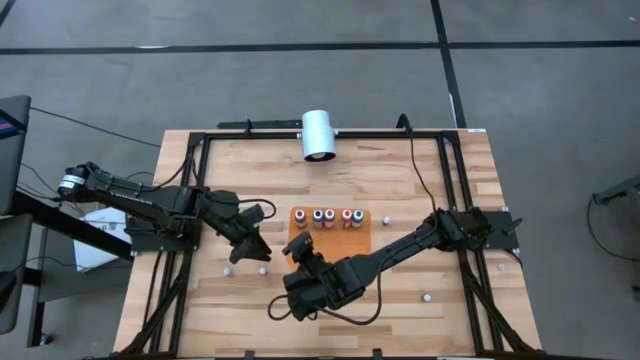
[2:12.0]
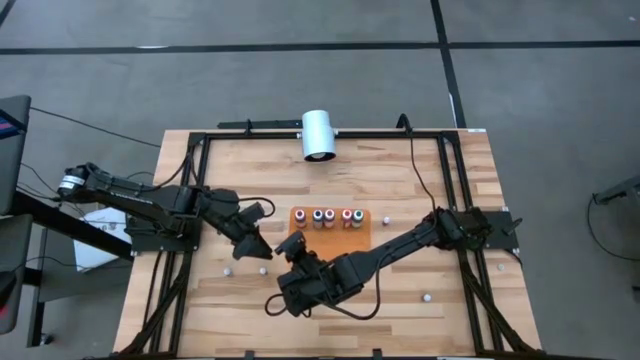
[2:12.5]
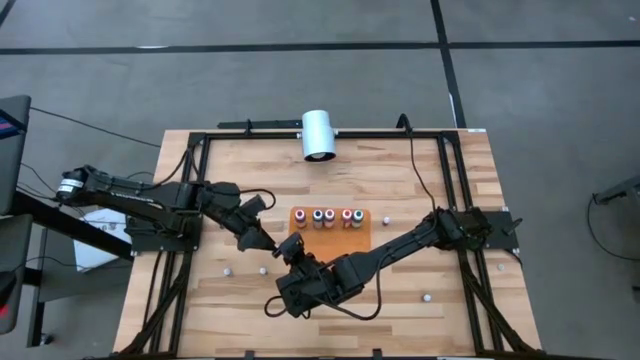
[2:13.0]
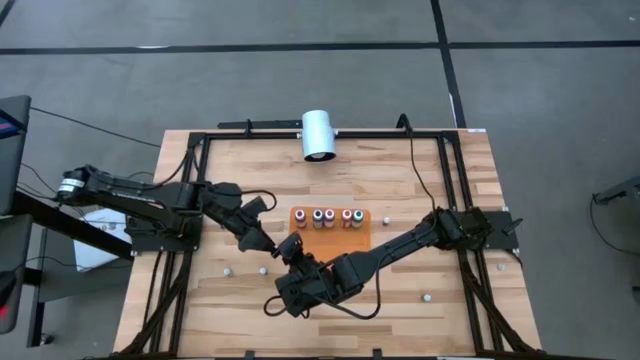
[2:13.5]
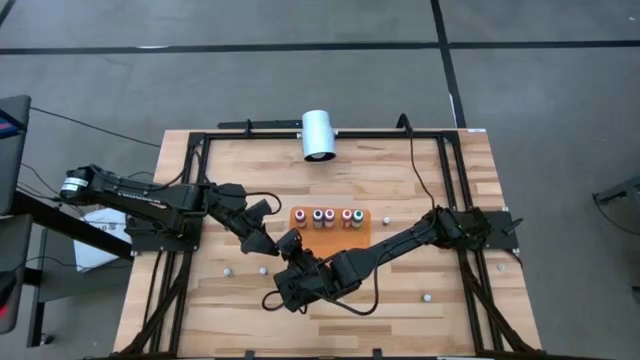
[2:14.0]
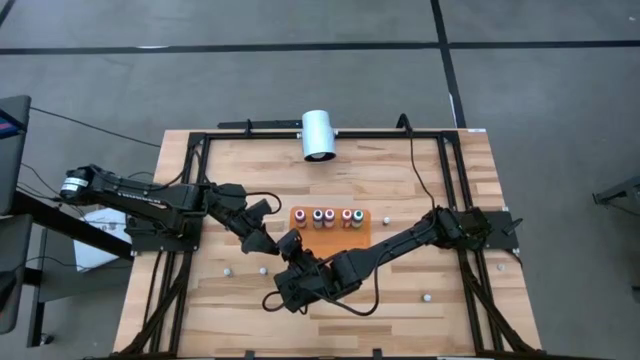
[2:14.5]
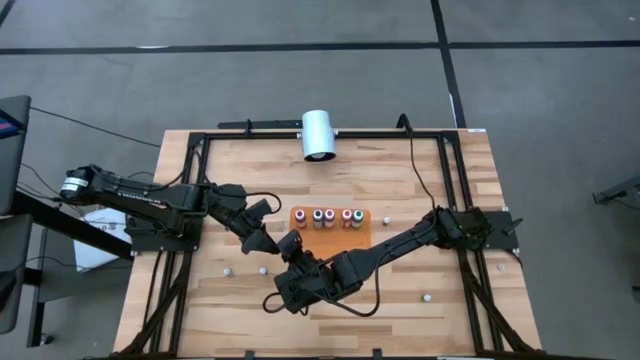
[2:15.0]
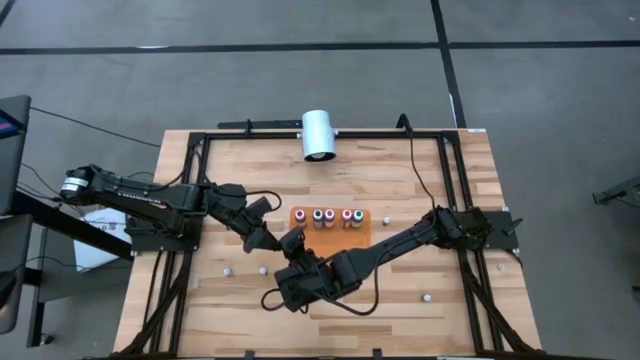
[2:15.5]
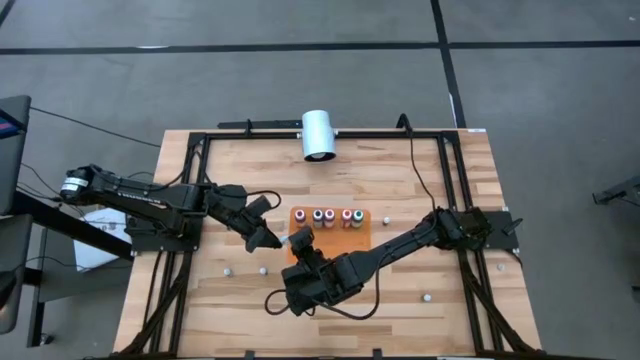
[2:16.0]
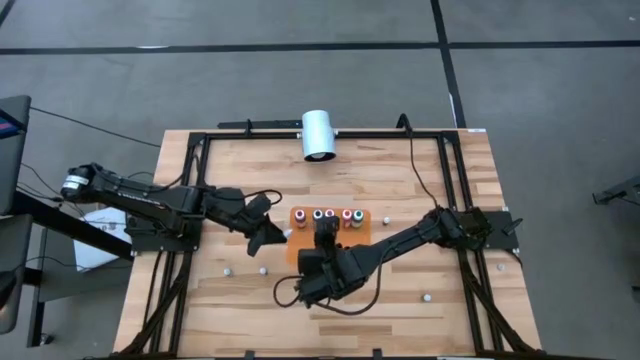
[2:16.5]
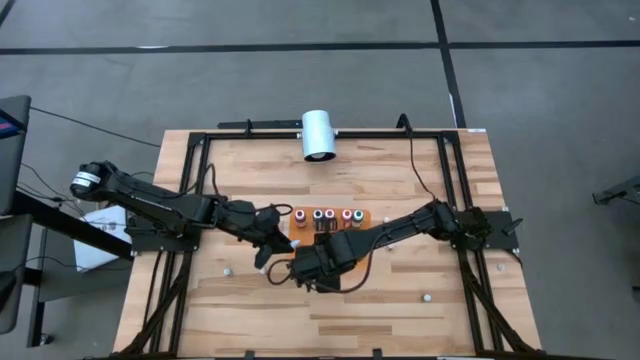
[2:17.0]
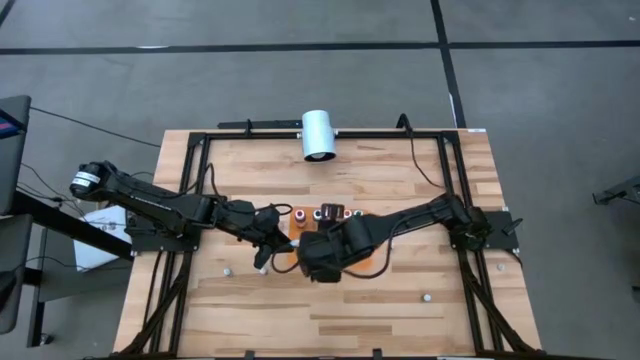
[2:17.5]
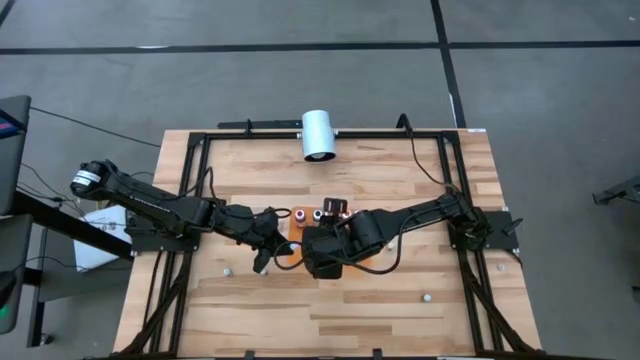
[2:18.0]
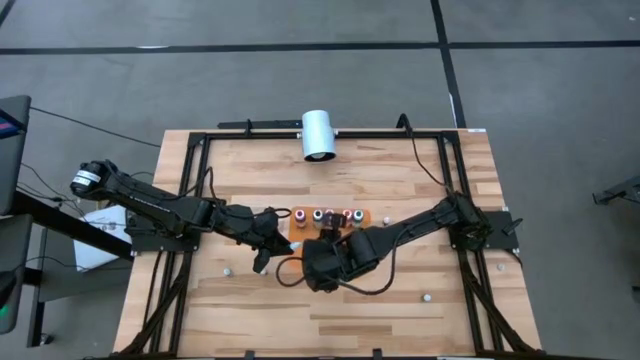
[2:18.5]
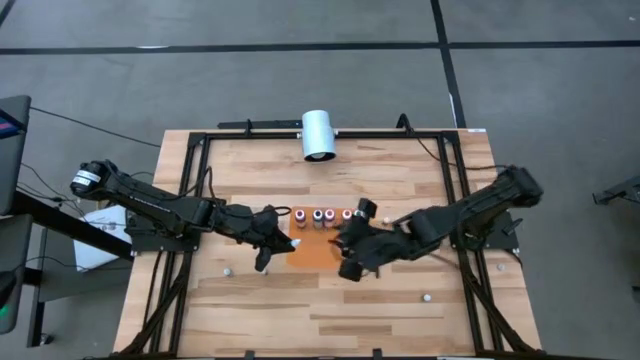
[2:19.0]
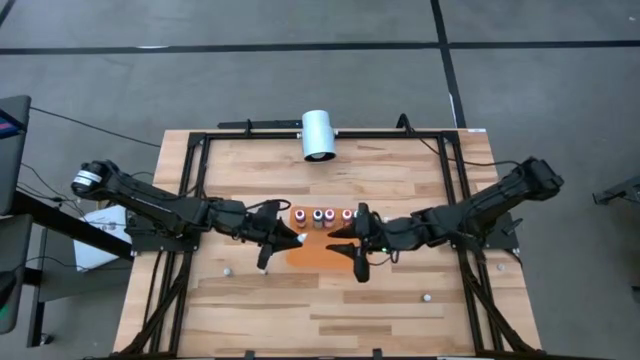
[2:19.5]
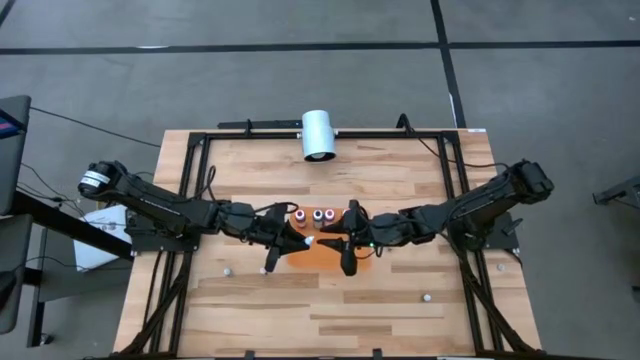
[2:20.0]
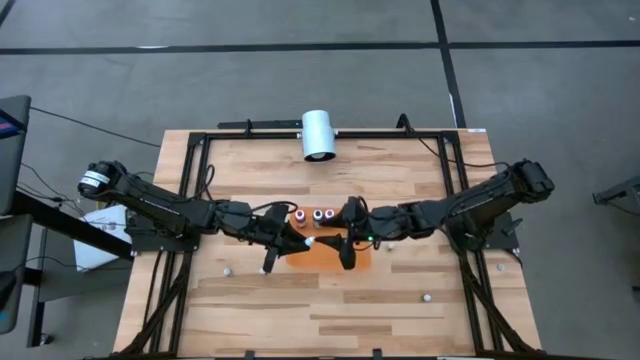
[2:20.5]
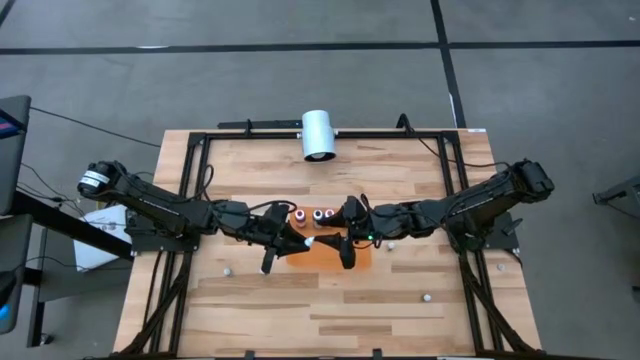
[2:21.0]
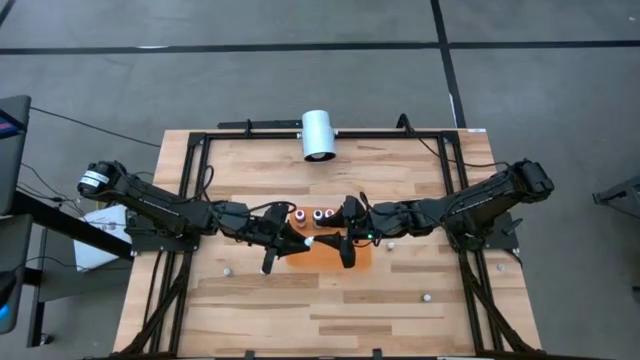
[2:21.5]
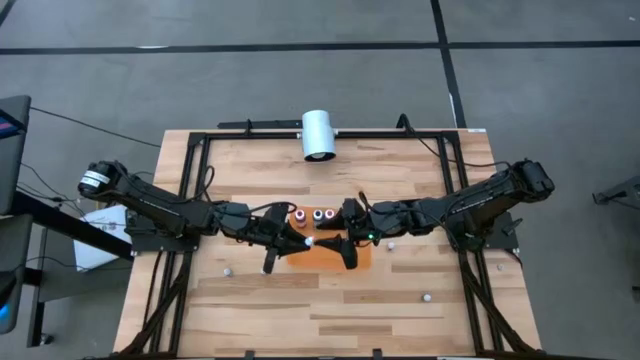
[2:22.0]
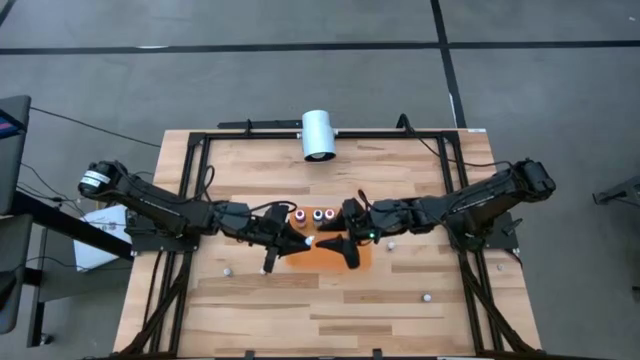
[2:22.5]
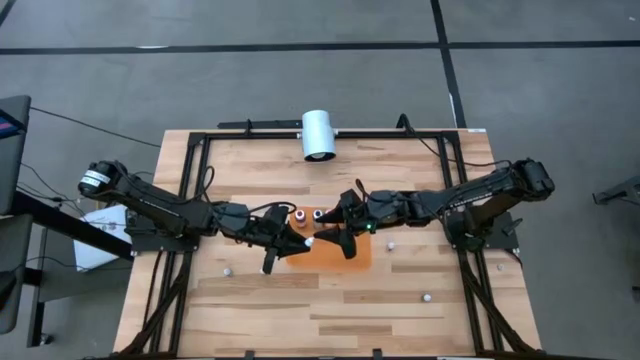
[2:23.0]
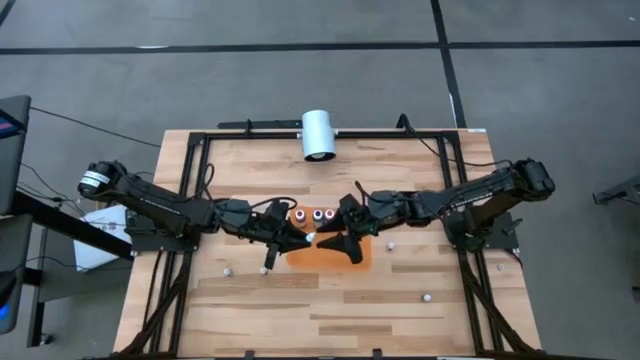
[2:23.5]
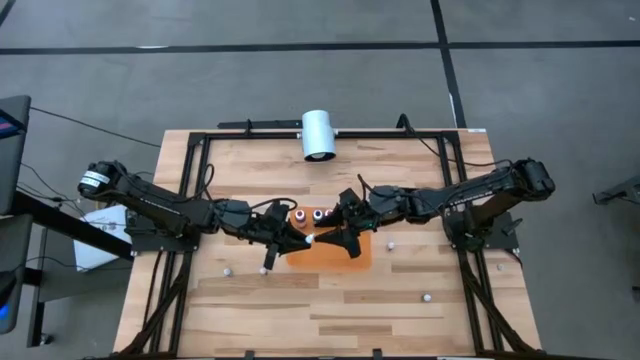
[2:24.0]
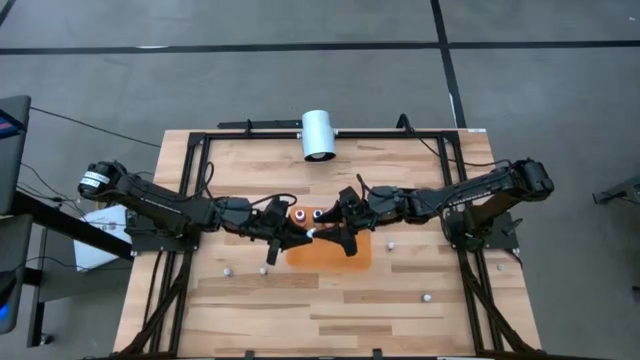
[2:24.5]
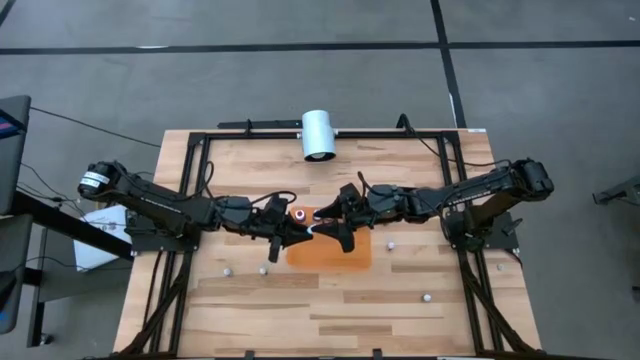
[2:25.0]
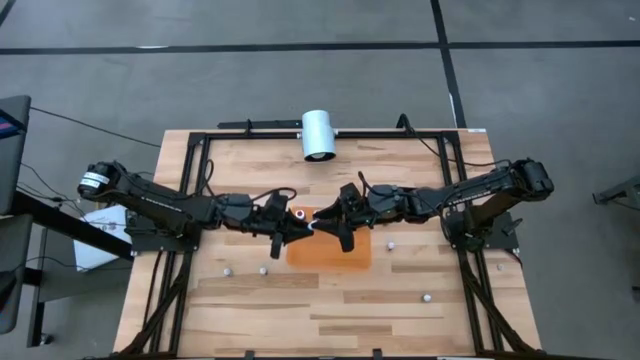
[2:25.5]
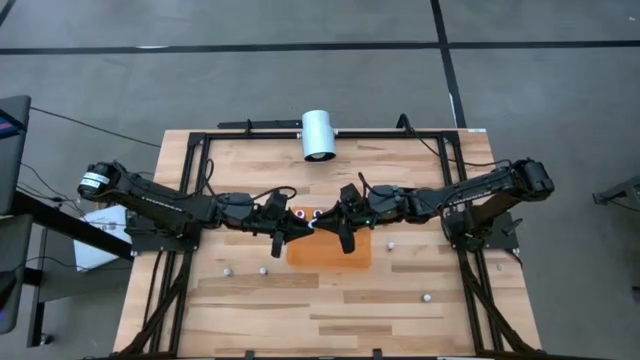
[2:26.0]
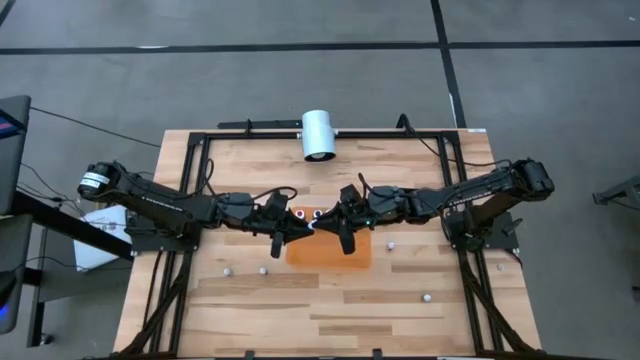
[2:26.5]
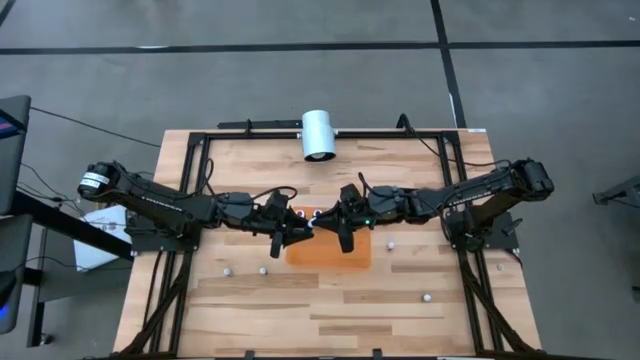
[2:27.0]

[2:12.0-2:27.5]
Task: Pick & Place food coloring
Put the small black food coloring into the orange bin

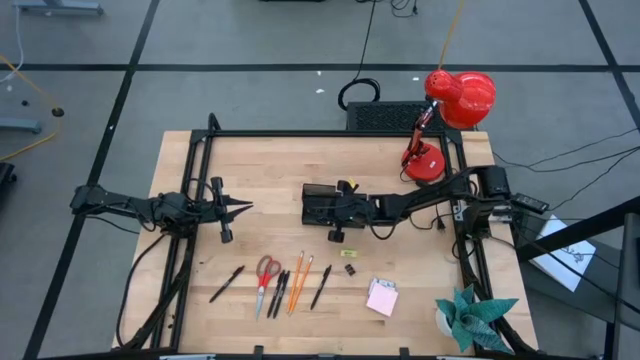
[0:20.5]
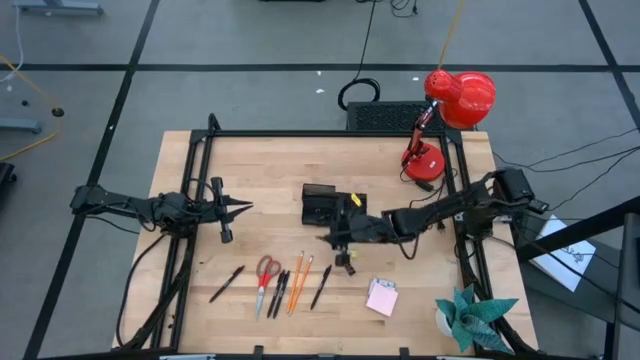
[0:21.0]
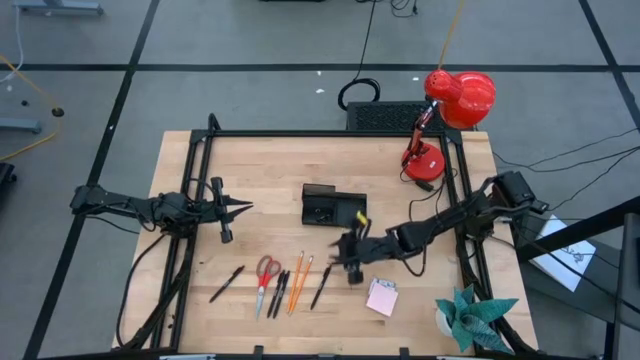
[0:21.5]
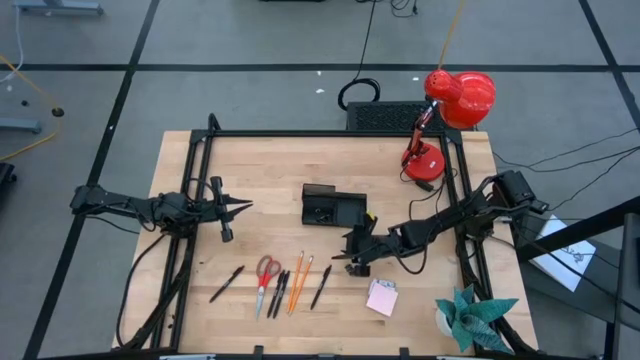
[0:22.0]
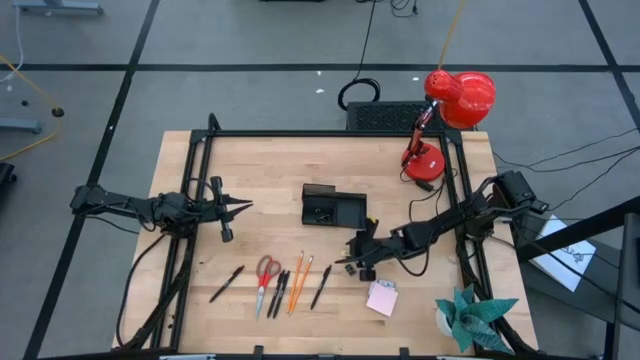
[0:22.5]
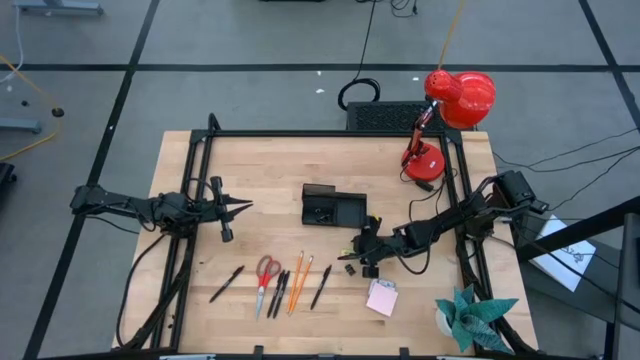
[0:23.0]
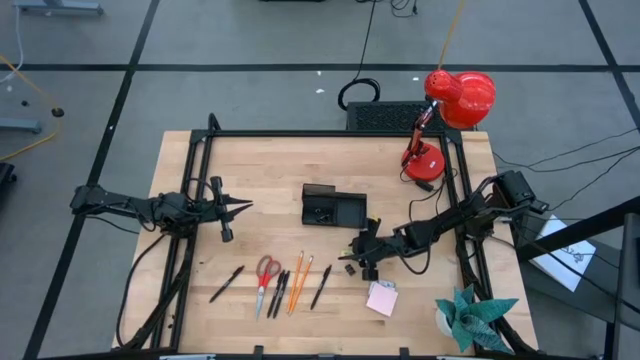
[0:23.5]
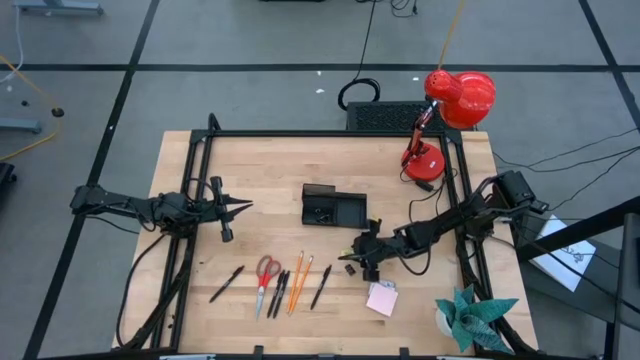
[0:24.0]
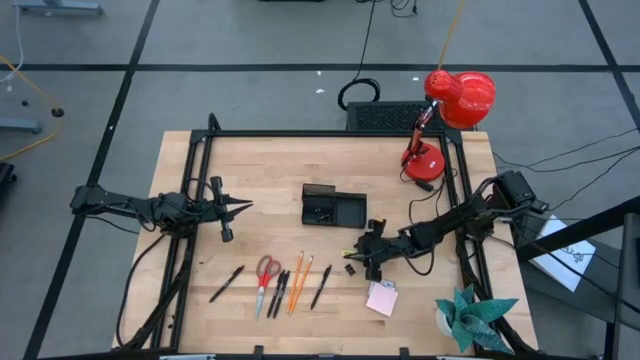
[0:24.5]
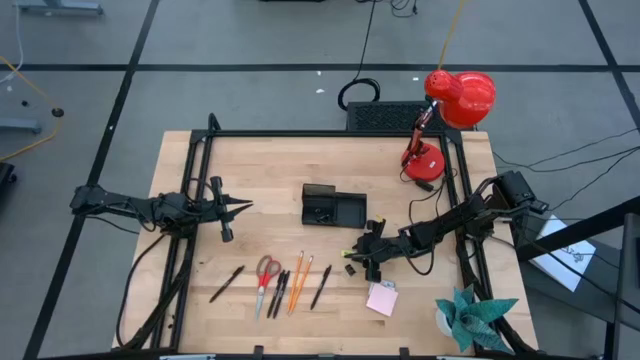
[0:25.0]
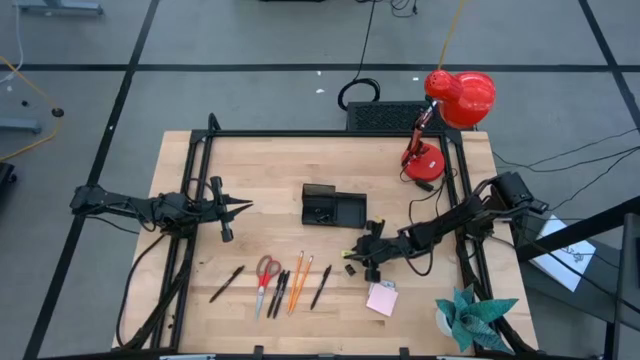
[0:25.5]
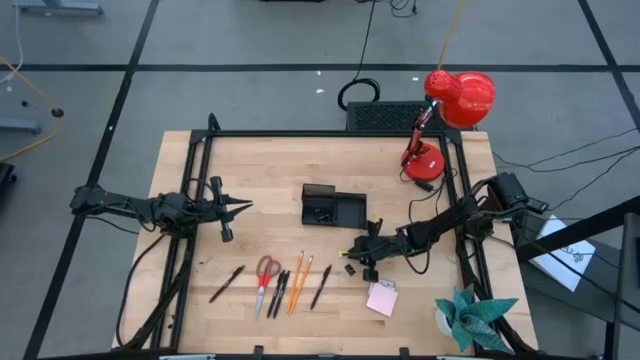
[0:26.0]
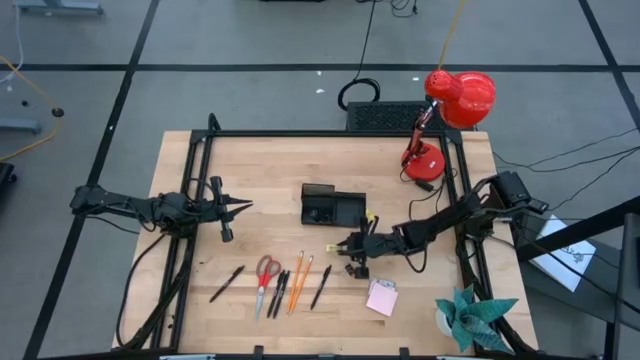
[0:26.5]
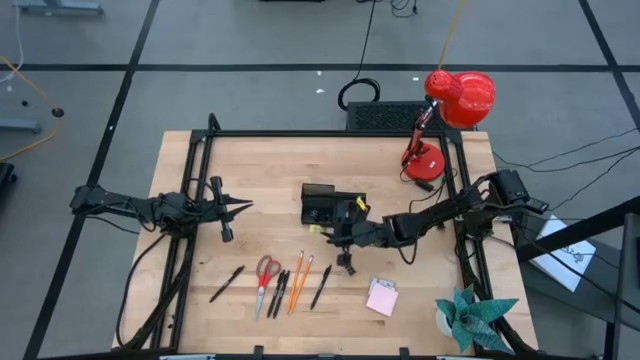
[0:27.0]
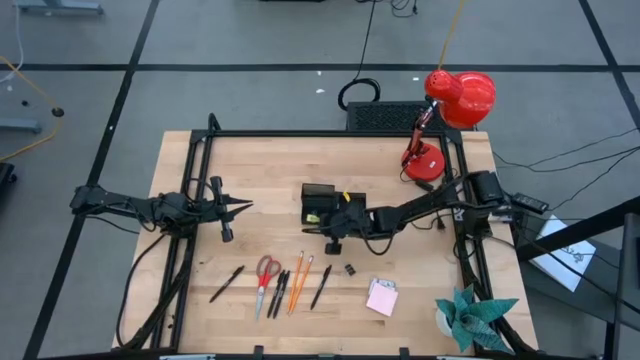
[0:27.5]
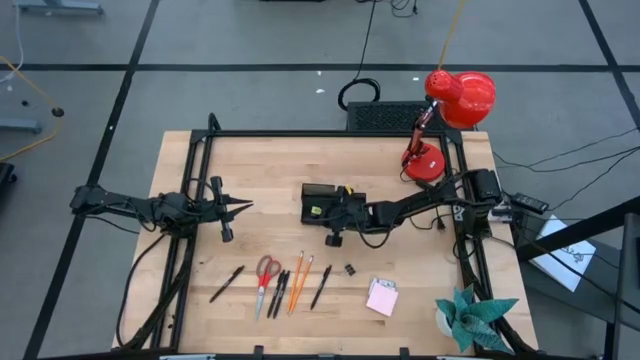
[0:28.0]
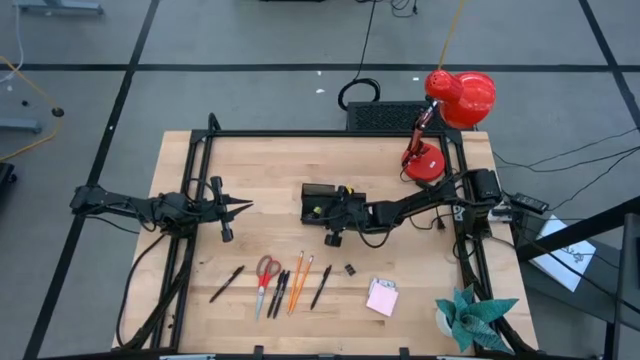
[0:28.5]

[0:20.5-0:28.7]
Task: Pick and place office supplies into organizer
Put the green eraser into the desk organizer
